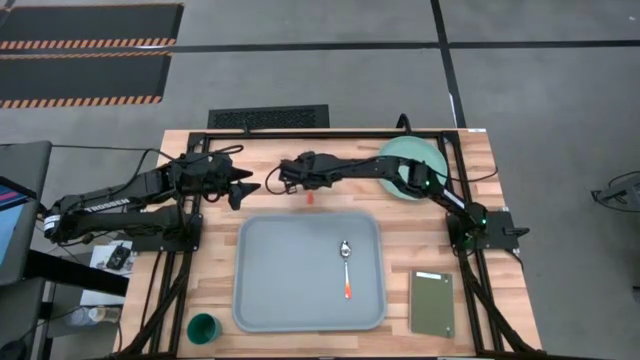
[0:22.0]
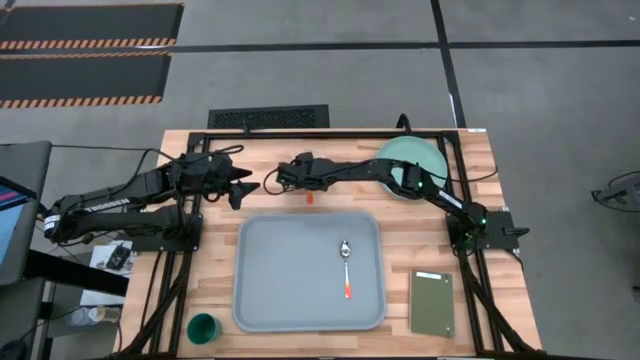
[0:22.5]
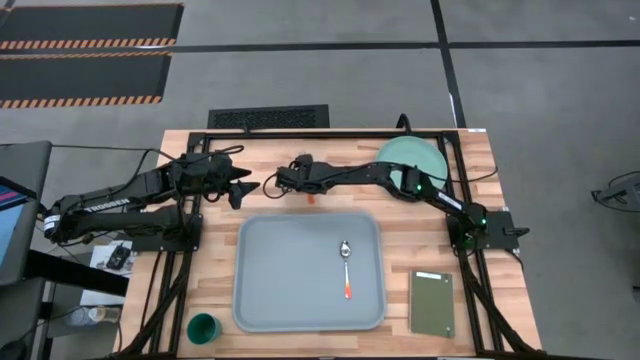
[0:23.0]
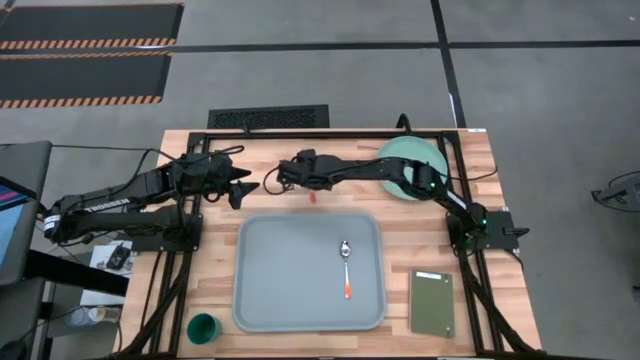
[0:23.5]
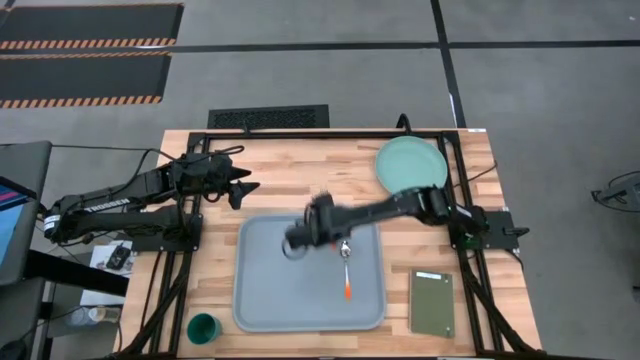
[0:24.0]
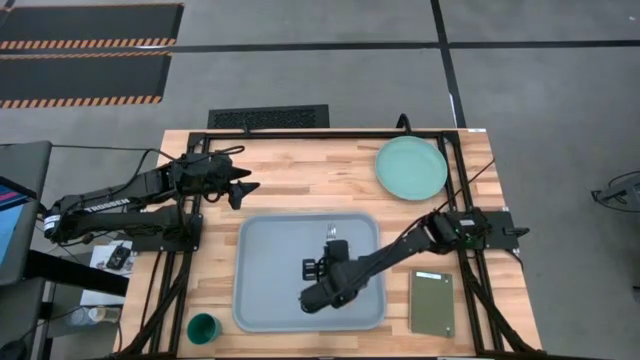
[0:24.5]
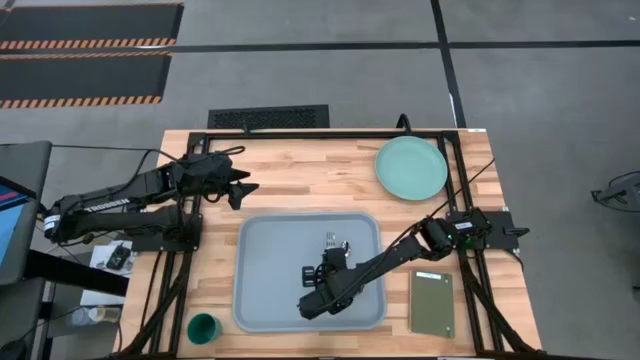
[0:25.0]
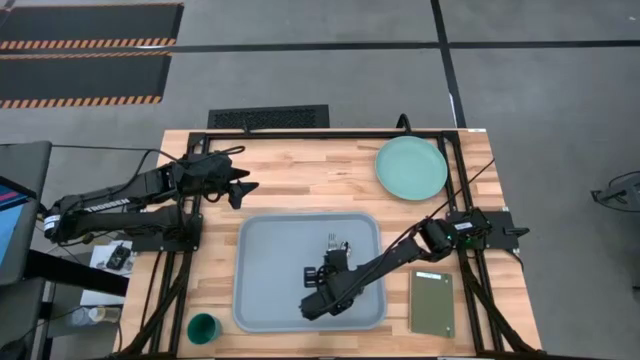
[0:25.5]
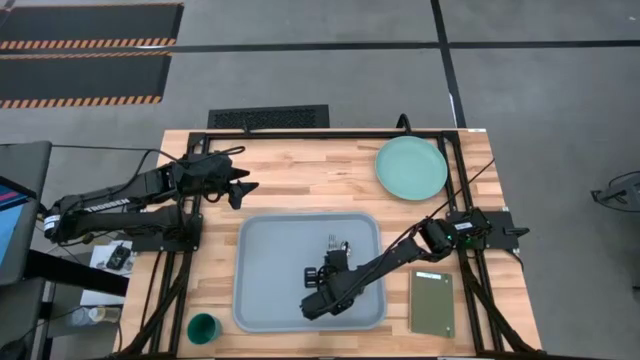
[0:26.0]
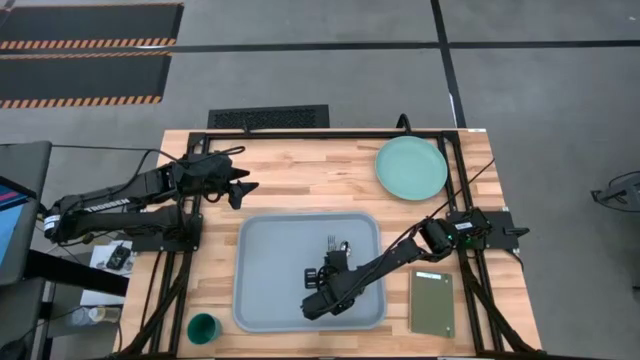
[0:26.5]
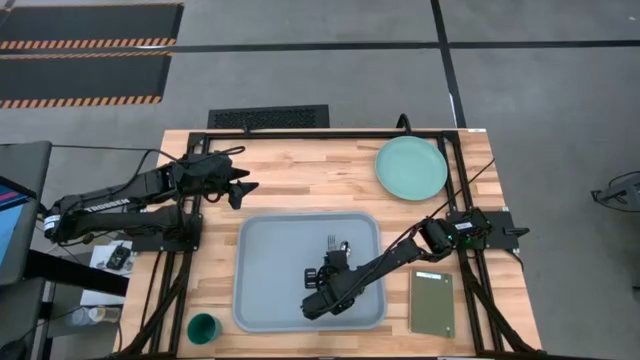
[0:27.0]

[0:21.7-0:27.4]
Task: Pick and place plate/cup/fork/spoon on tray
Put the orange fork on the gray tray to the left of the orange spoon

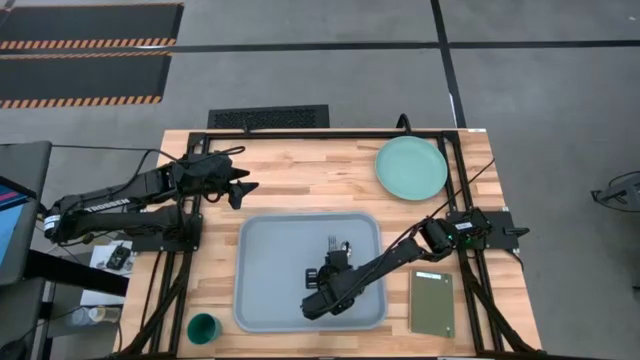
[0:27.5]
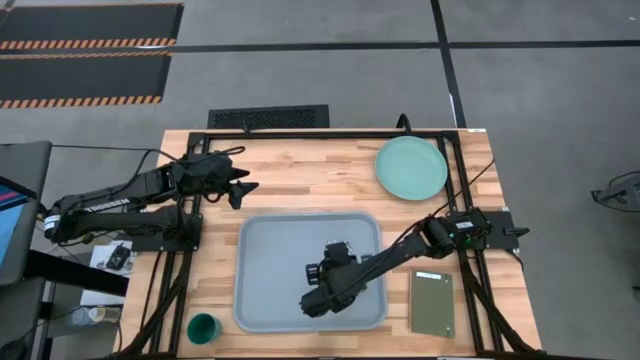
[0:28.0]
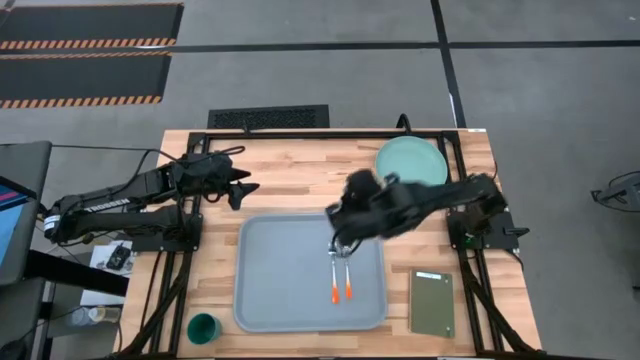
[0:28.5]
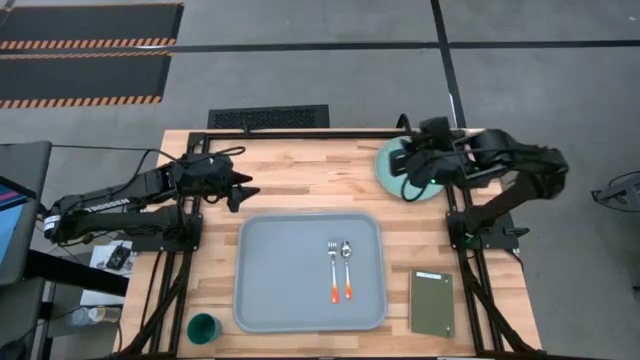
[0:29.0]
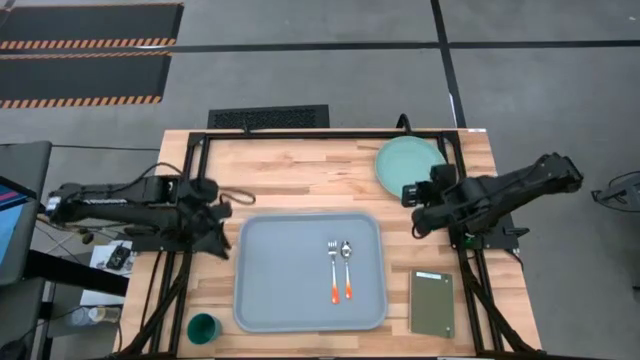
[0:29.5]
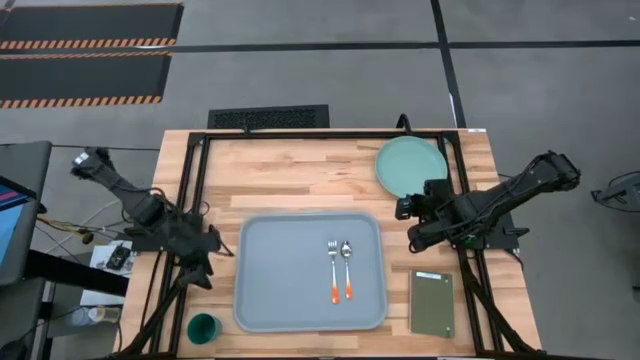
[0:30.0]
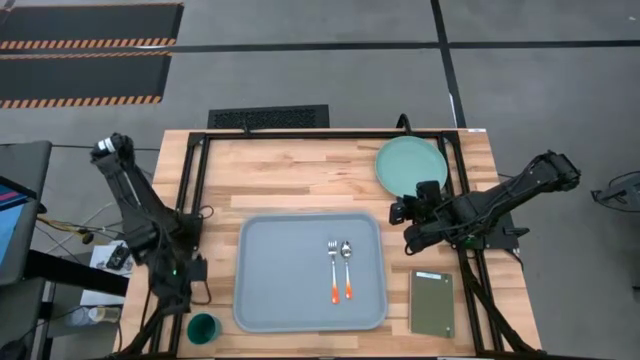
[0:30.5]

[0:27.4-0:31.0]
Move the green cup to the top left of the gray tray

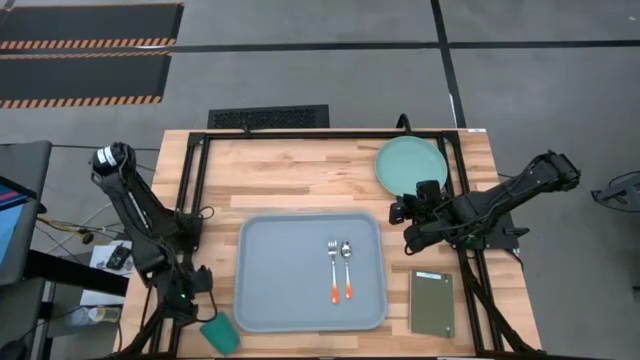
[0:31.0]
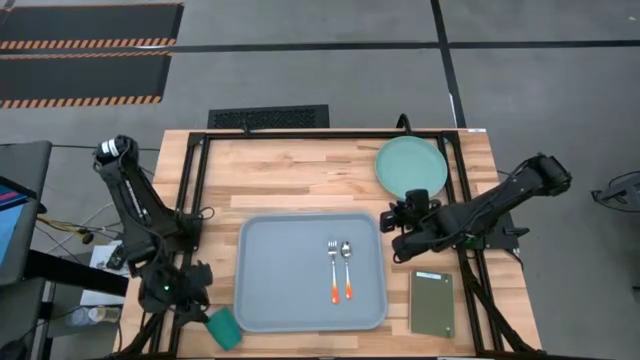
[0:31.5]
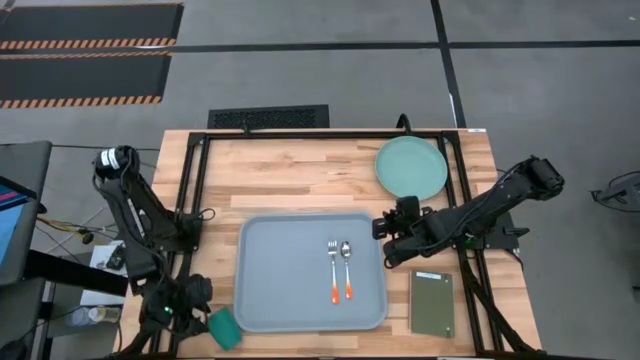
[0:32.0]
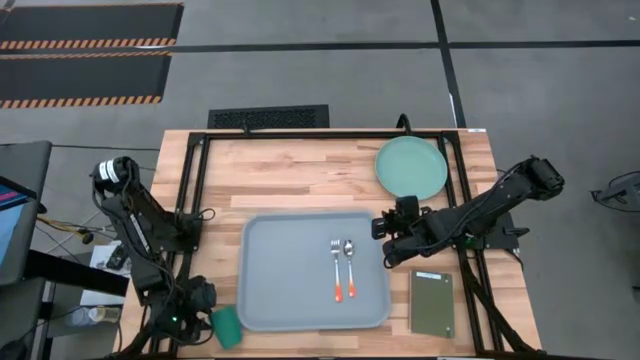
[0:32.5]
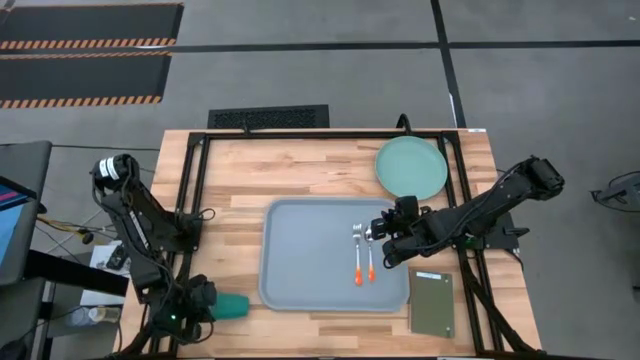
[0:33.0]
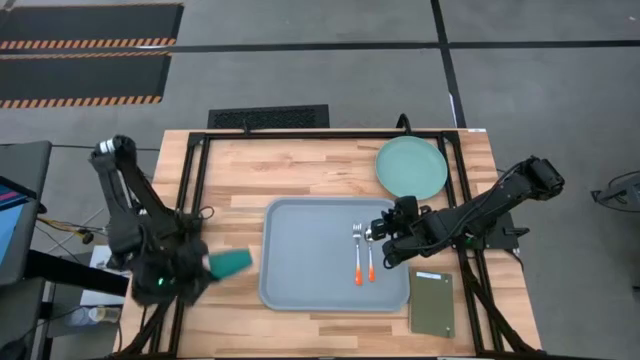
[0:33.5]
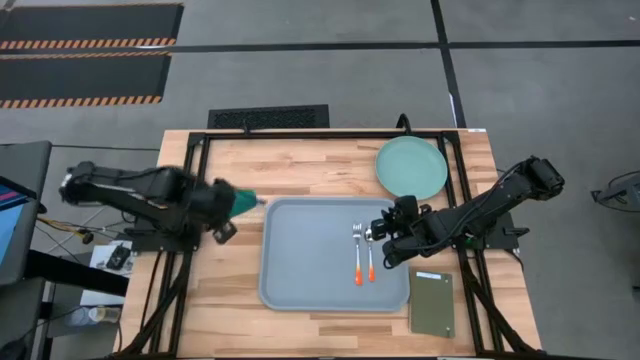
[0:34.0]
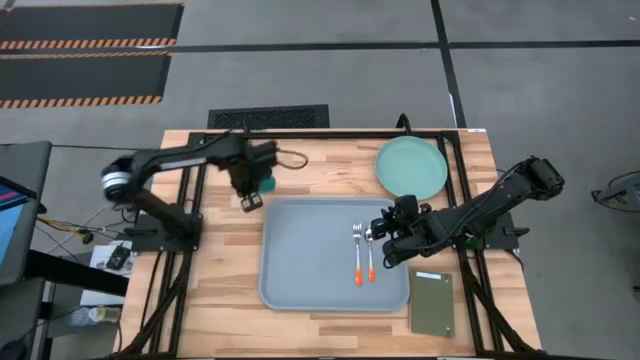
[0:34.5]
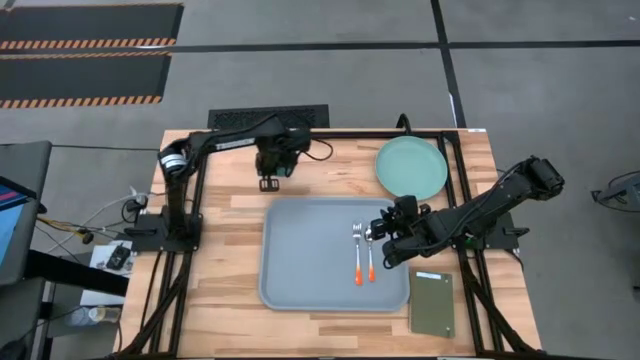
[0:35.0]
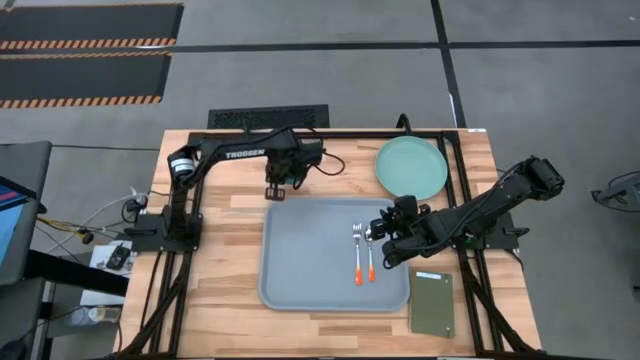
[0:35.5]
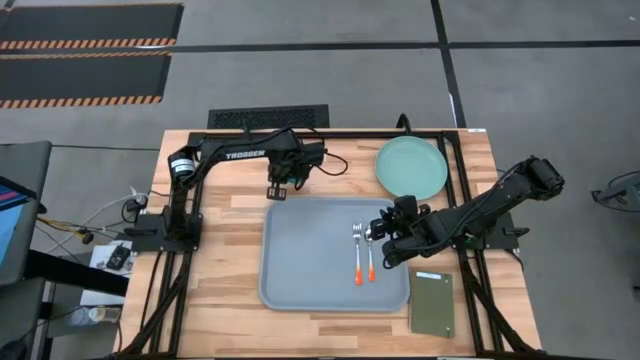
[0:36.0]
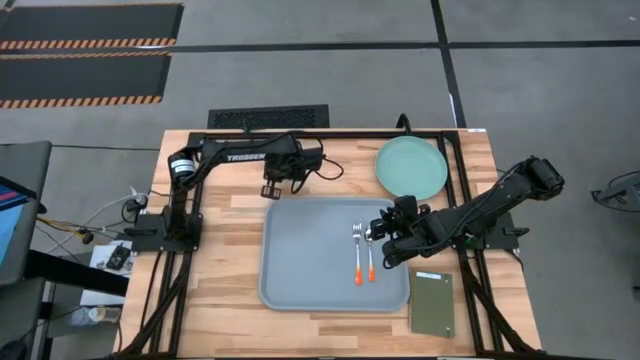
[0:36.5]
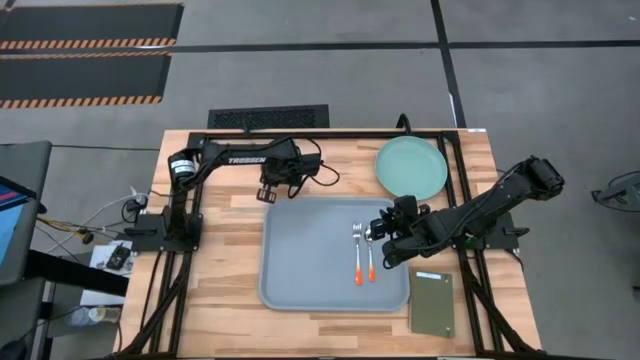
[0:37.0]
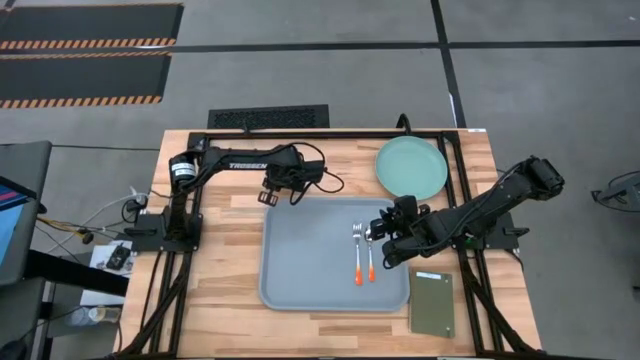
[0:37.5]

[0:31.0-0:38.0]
Move the green cup to the top left of the gray tray

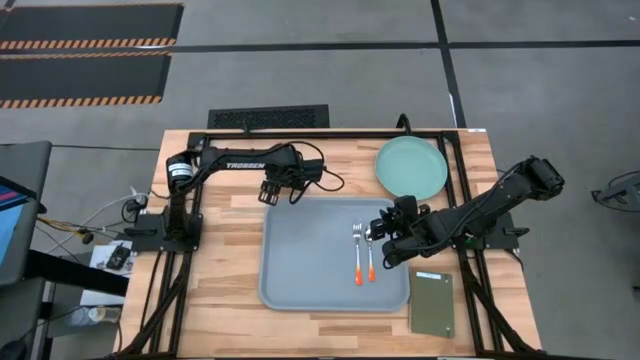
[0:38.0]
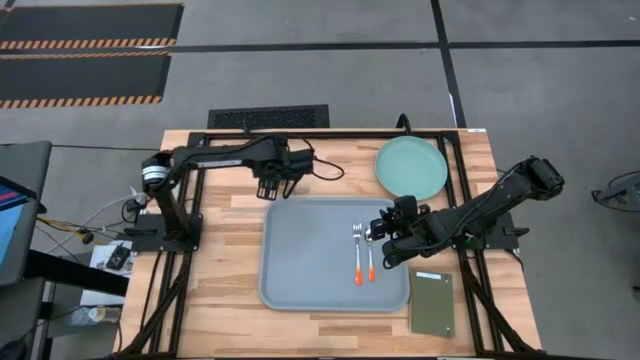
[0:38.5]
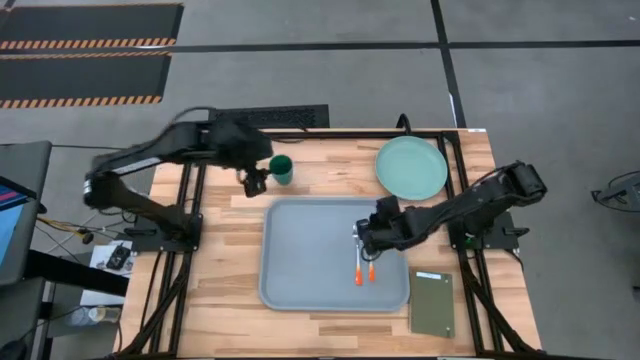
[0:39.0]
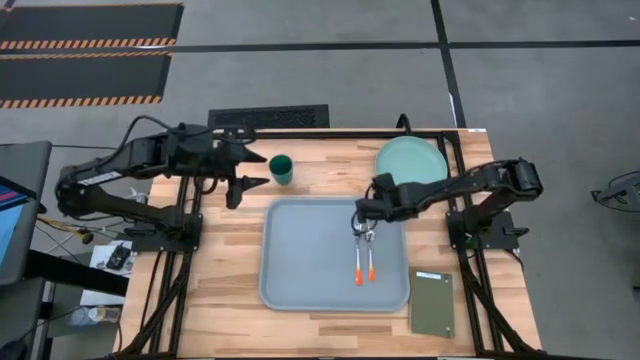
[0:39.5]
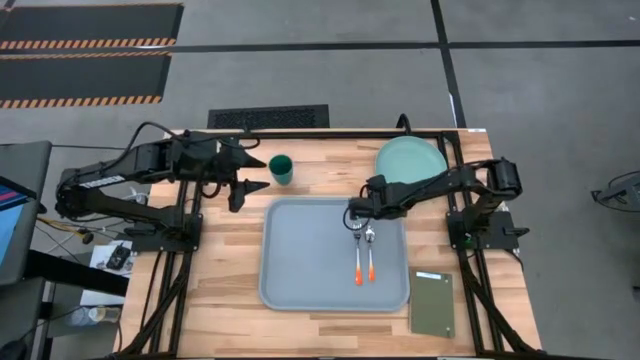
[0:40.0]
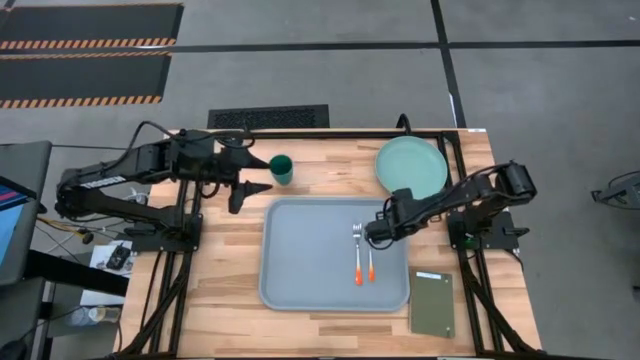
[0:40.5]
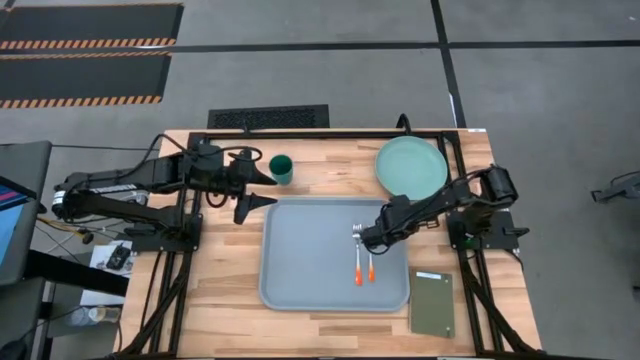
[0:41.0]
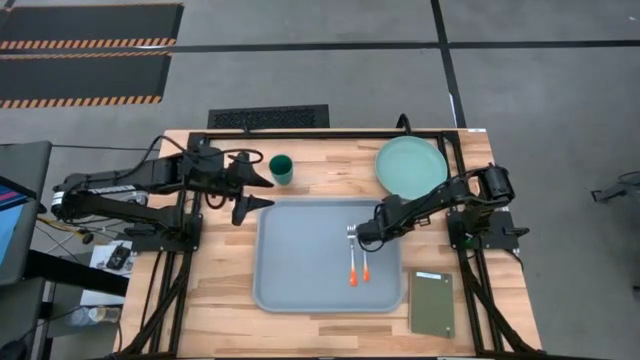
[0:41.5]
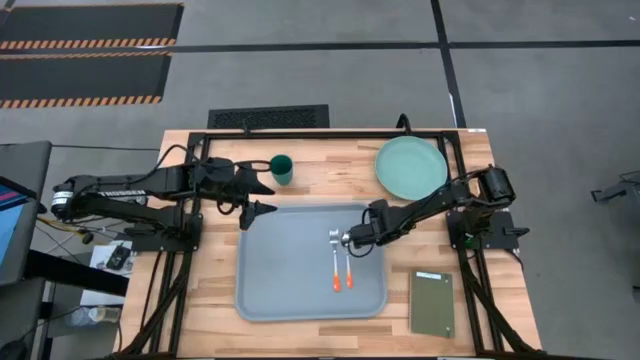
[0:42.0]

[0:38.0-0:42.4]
Adjust the gray tray
